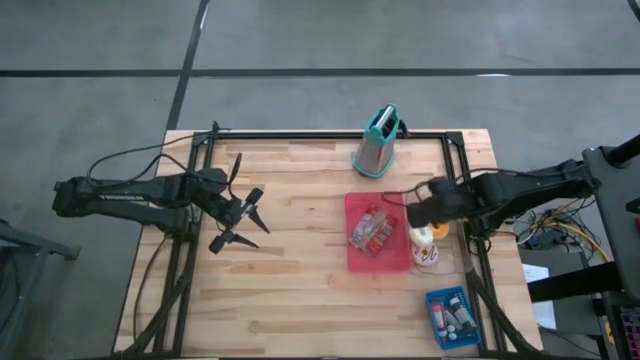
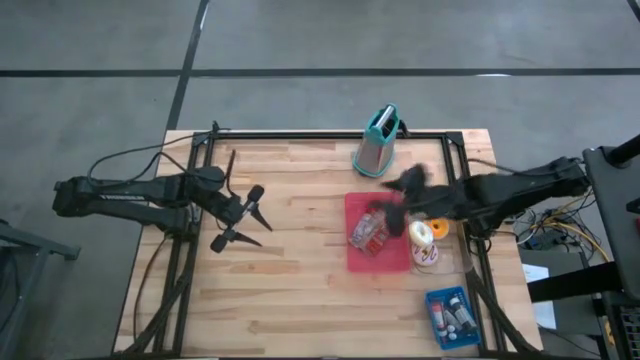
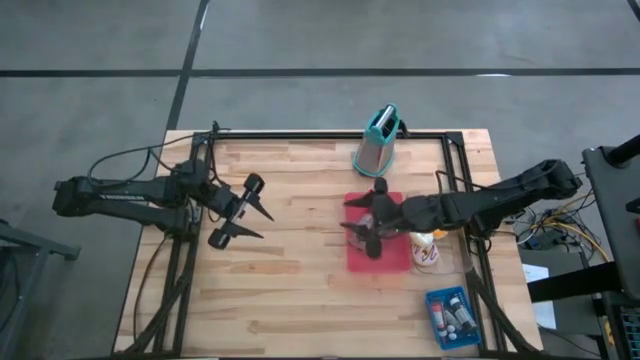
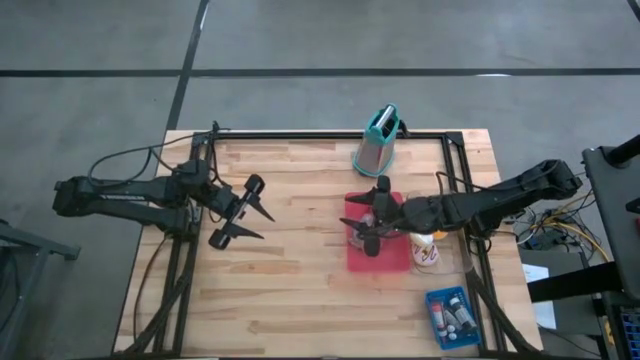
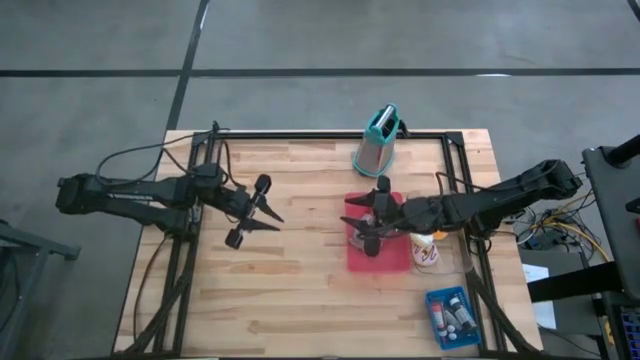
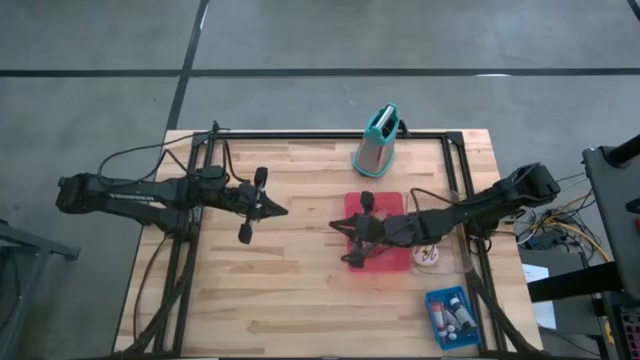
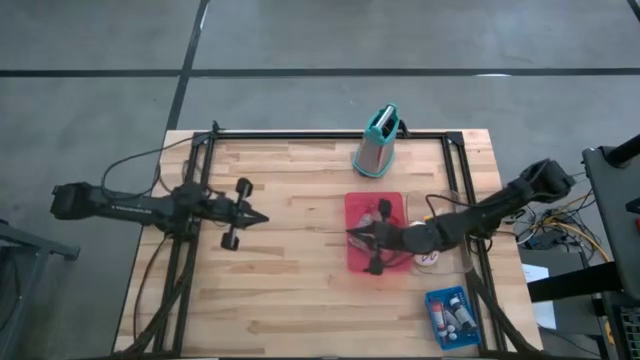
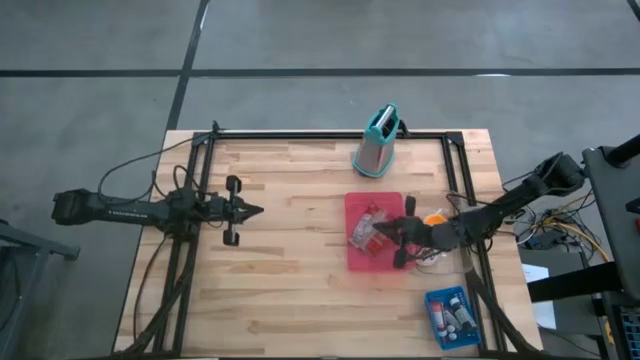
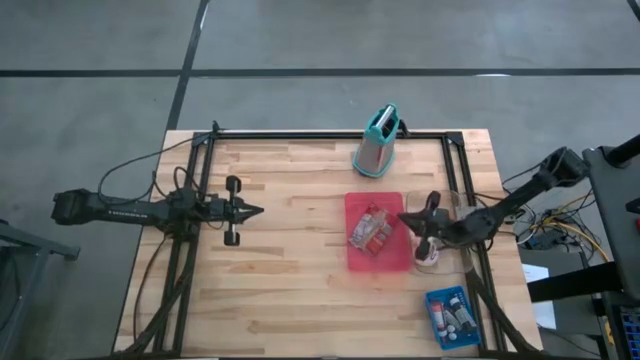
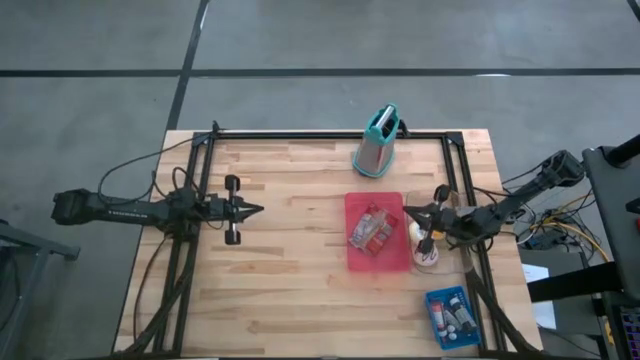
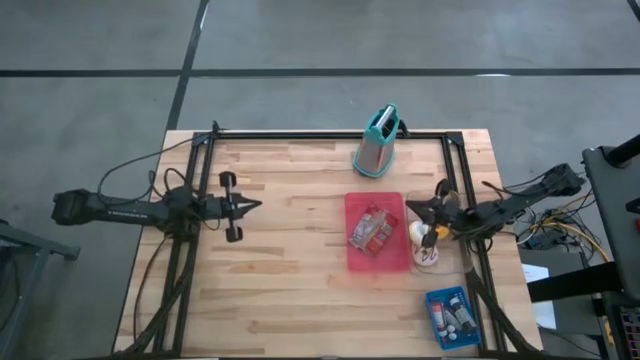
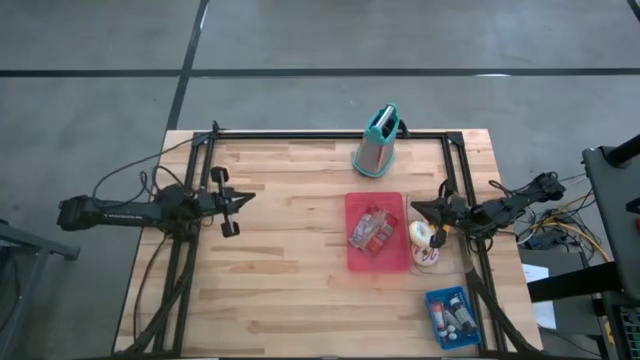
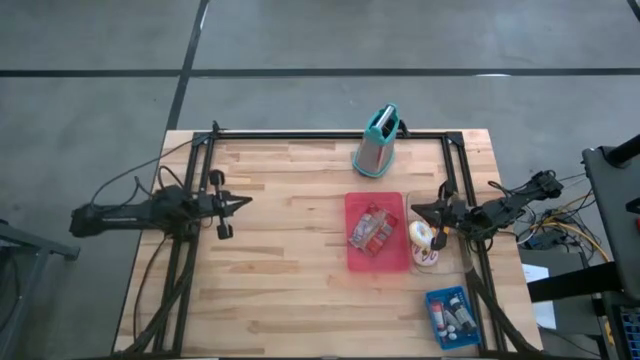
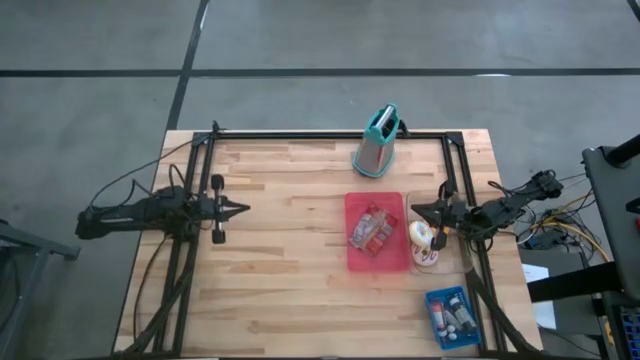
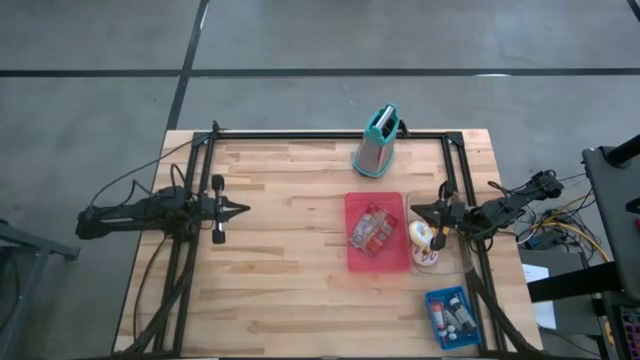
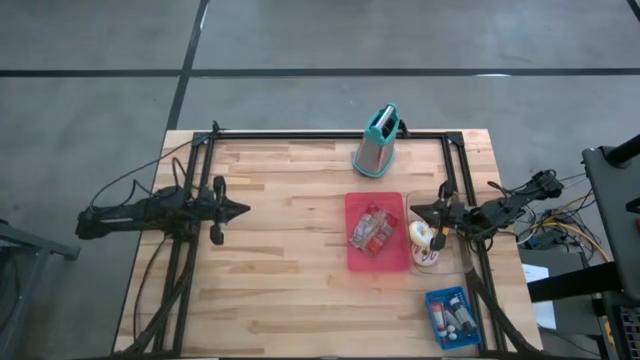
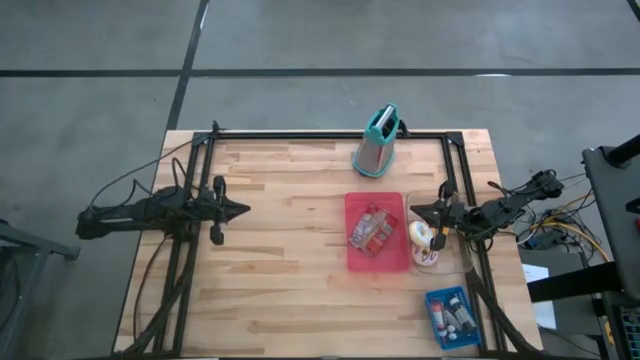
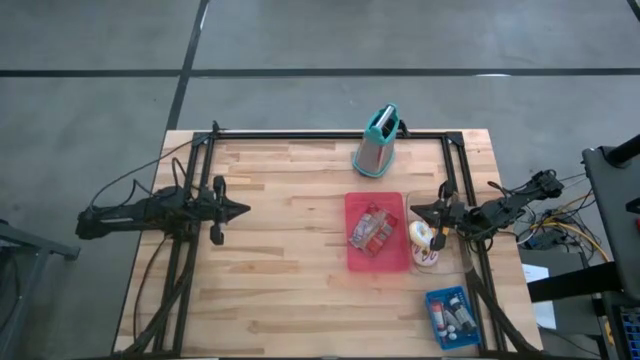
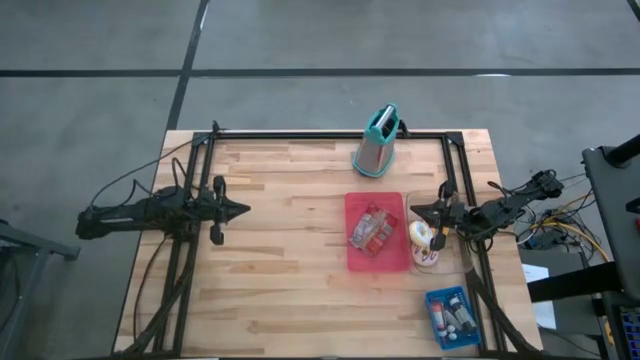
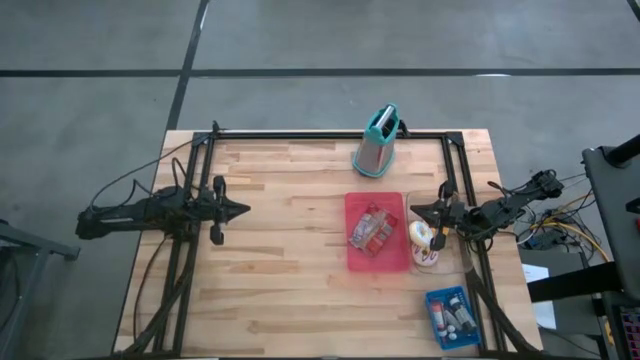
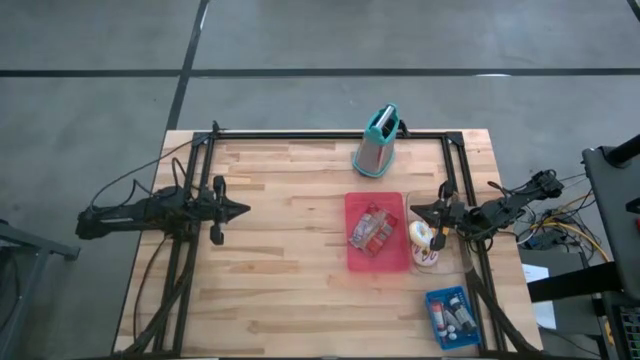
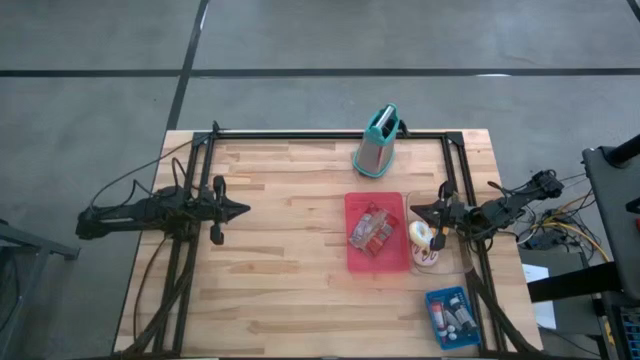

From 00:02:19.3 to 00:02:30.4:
Task: Pick & Place Food Item
Return to Home Position

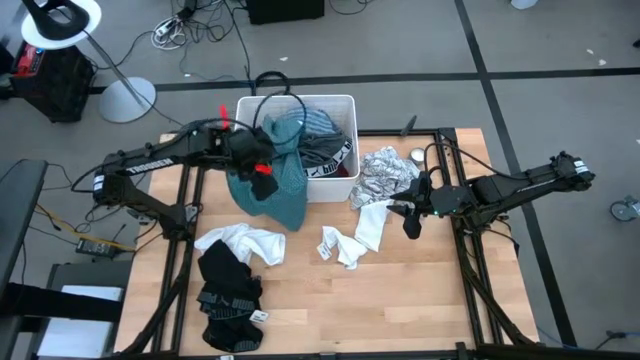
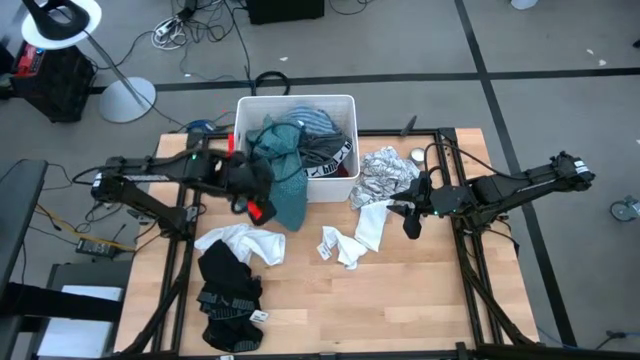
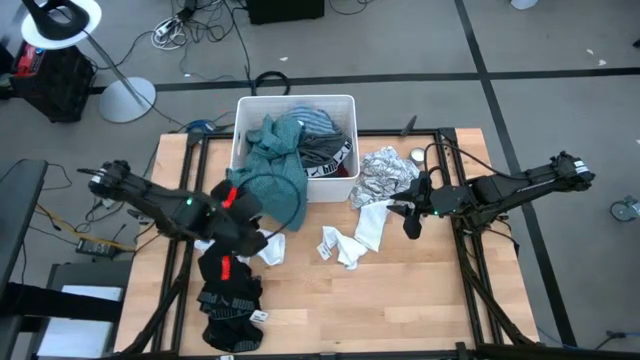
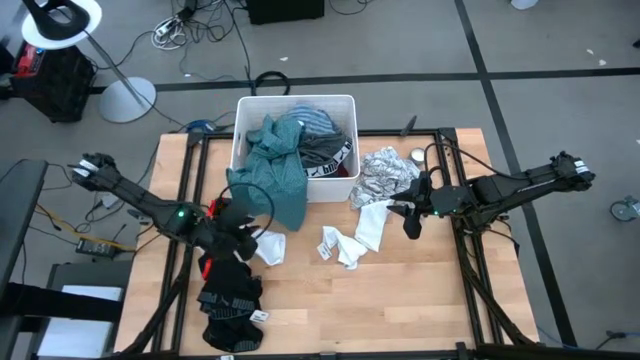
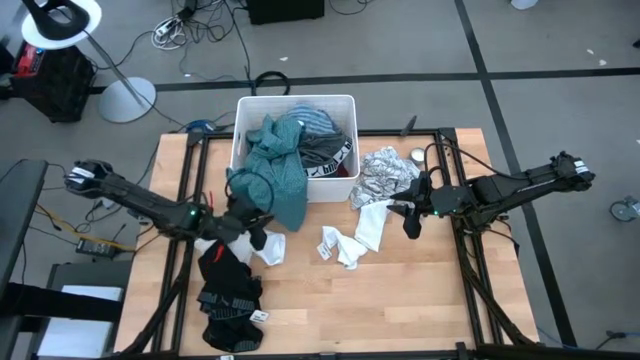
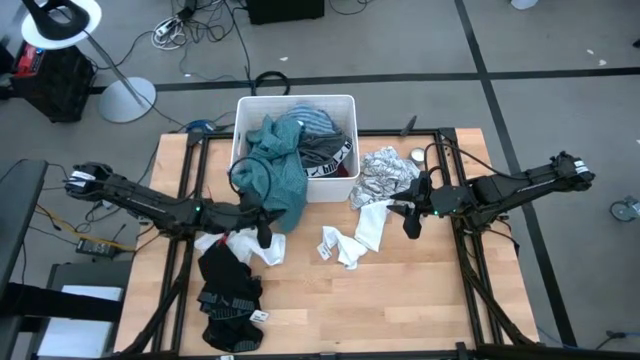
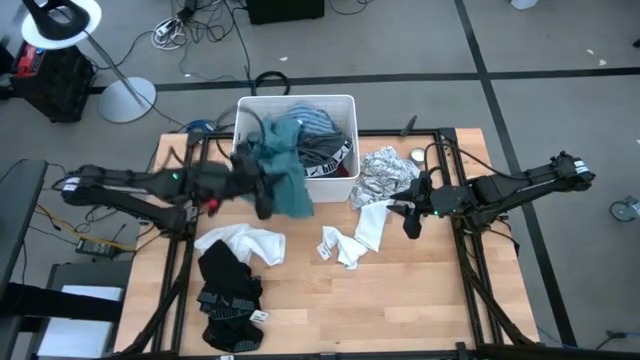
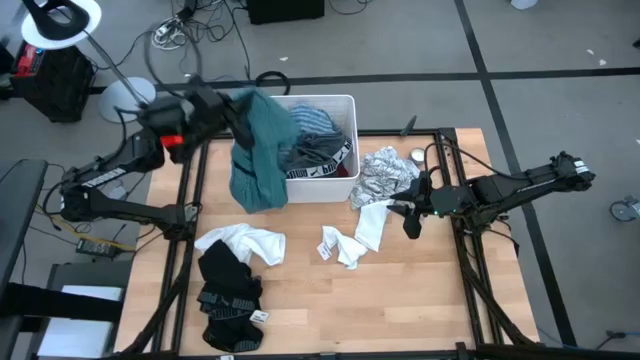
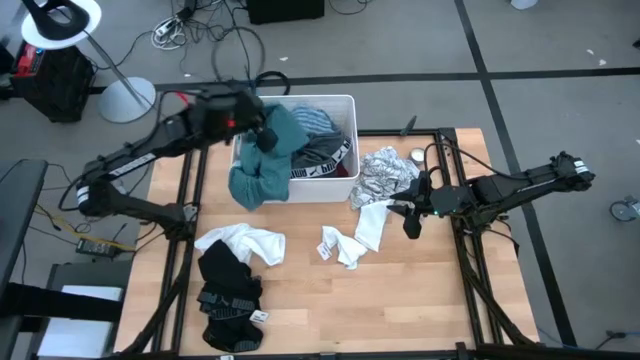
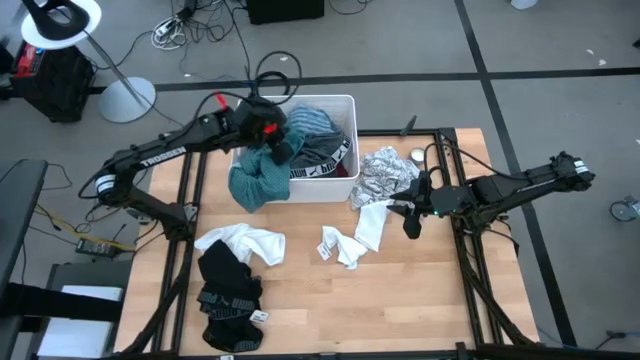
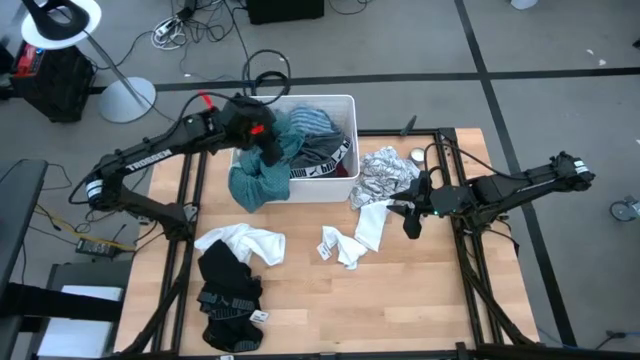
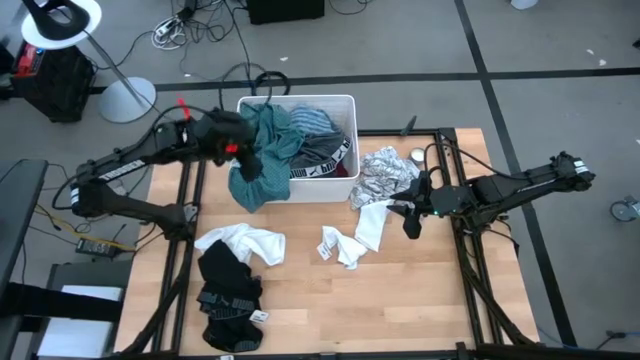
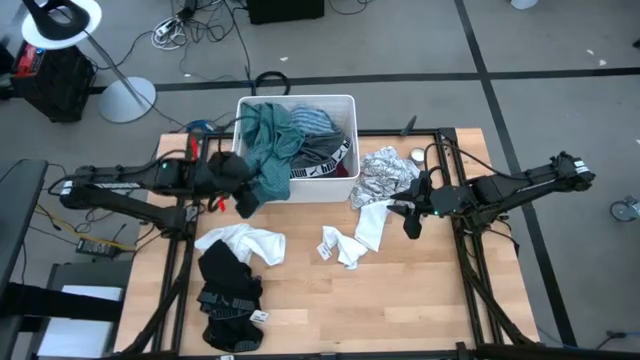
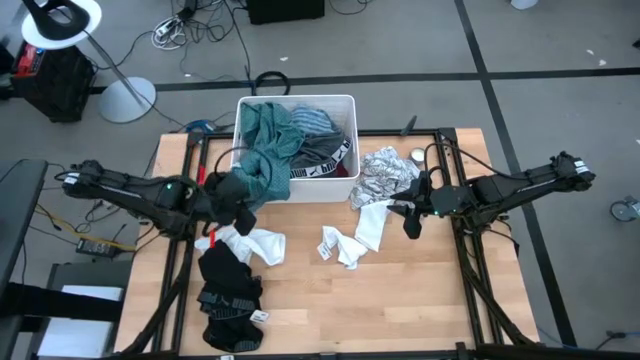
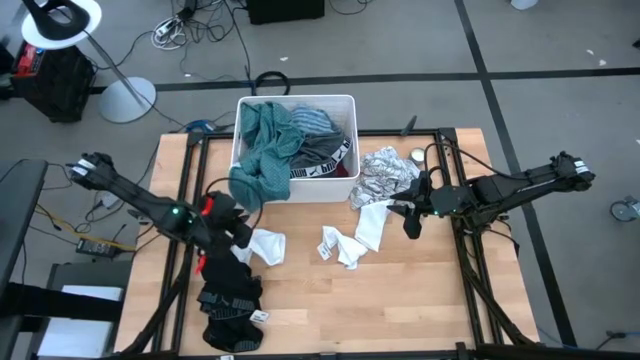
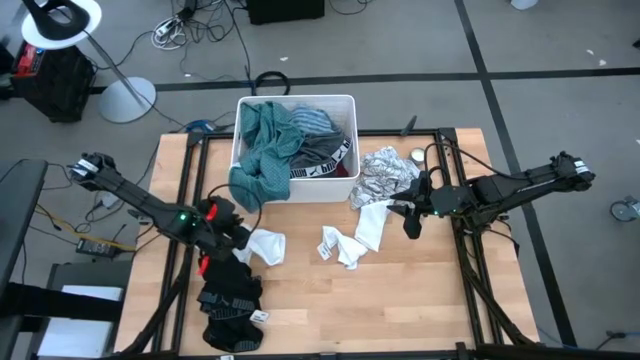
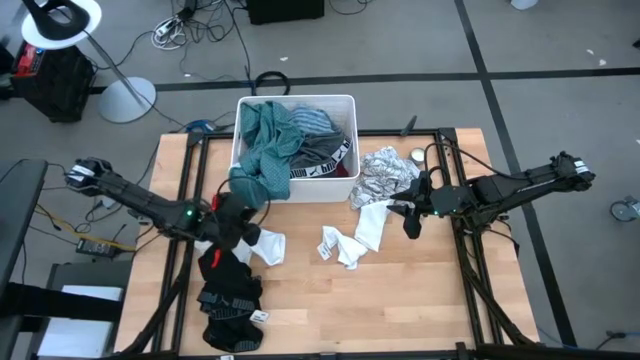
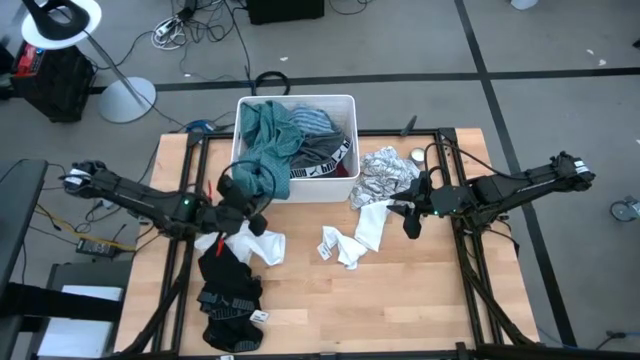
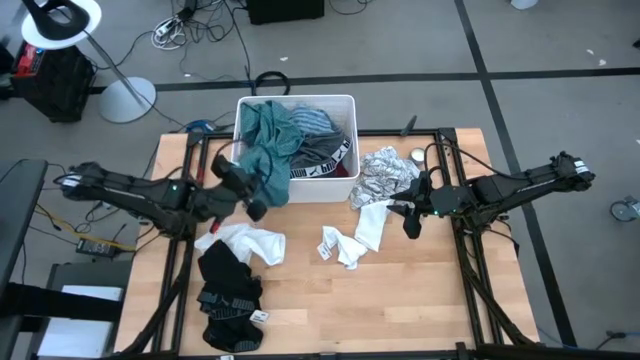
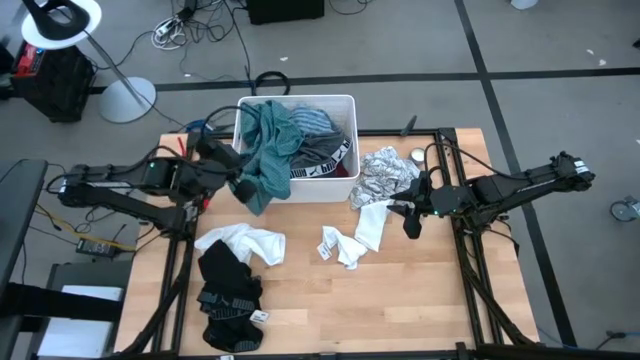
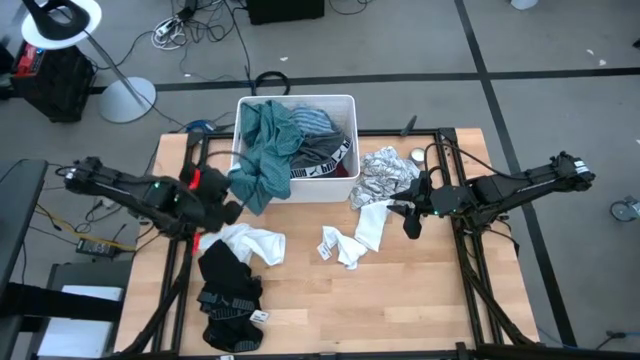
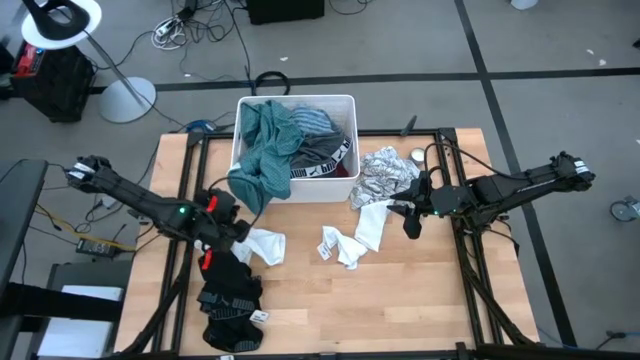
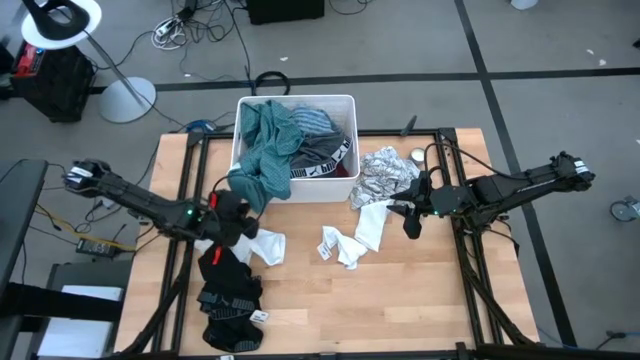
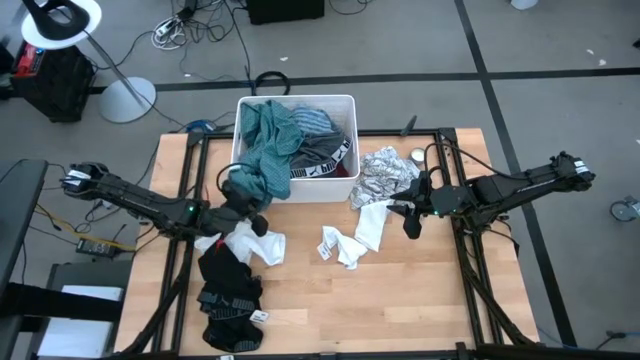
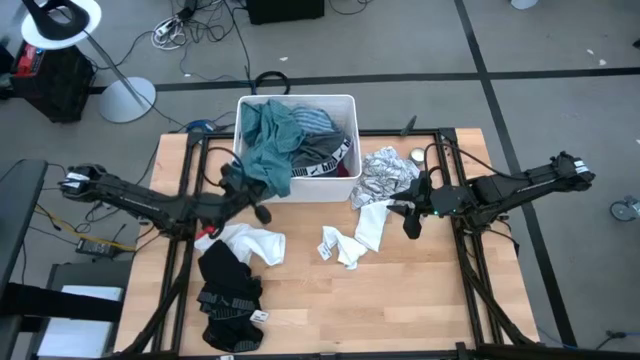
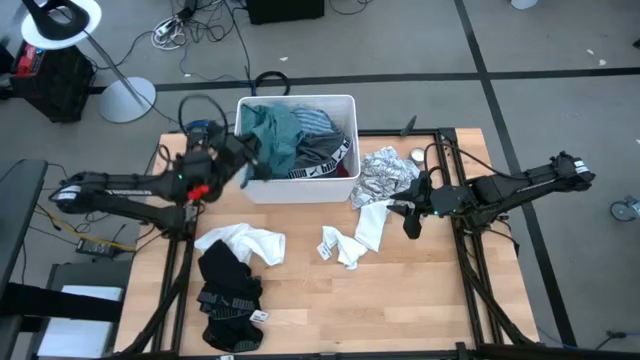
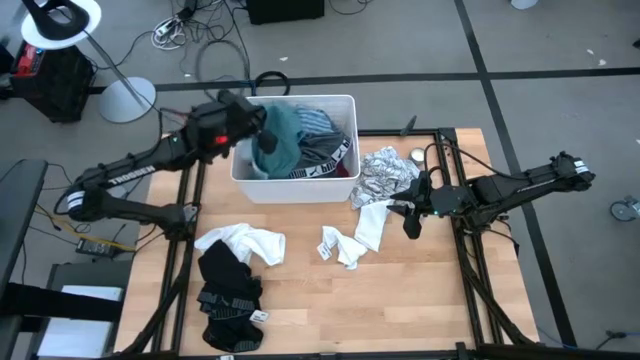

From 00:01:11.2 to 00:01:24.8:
Task: Sort clothes
Put the green patterned long sleeve shirt into the white laundry bin
